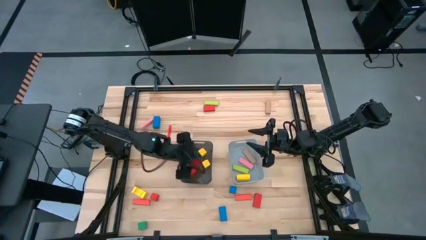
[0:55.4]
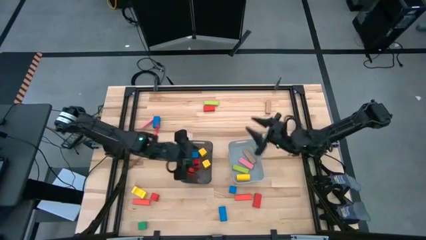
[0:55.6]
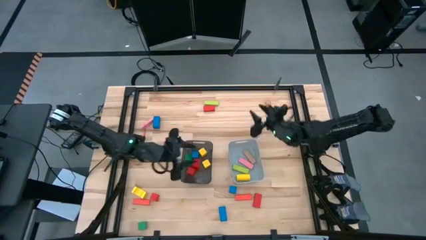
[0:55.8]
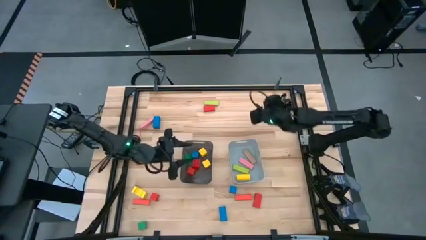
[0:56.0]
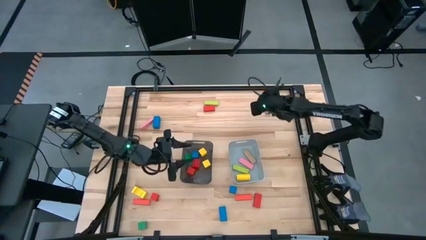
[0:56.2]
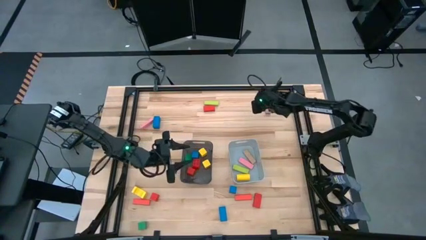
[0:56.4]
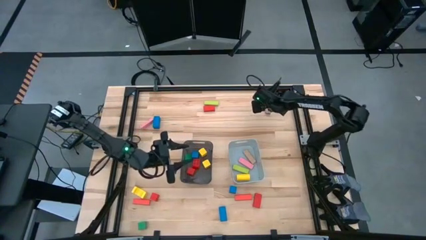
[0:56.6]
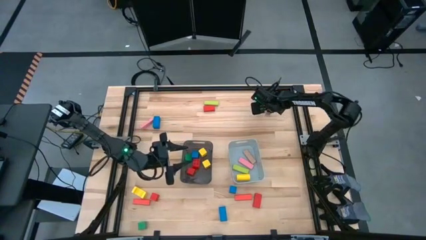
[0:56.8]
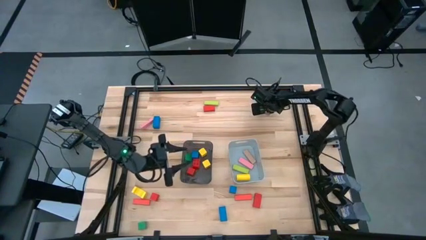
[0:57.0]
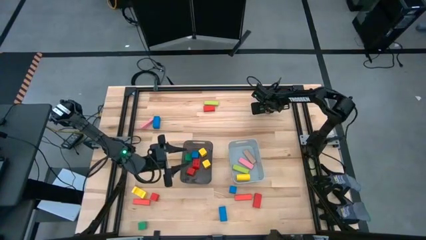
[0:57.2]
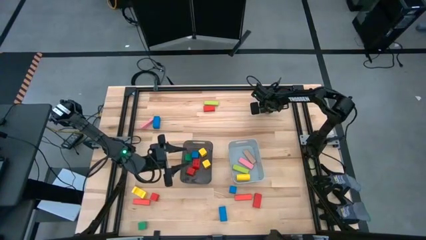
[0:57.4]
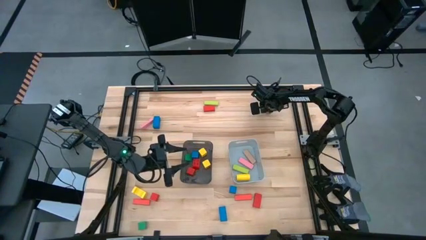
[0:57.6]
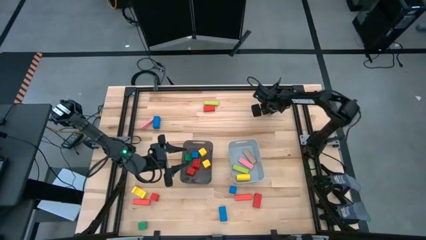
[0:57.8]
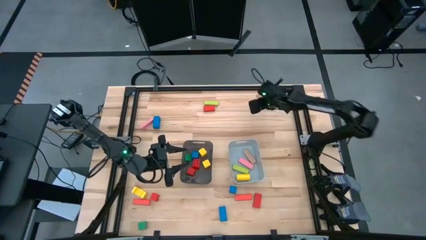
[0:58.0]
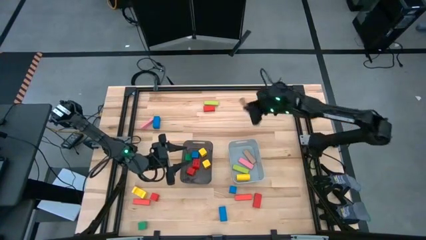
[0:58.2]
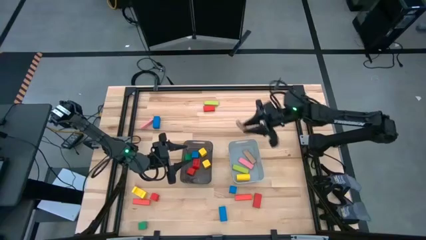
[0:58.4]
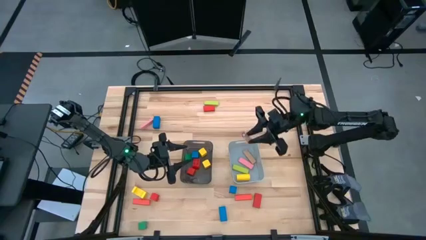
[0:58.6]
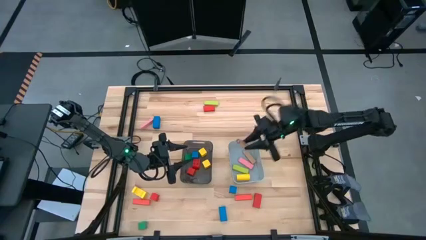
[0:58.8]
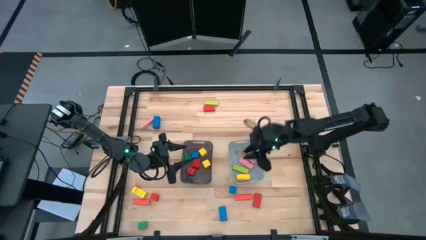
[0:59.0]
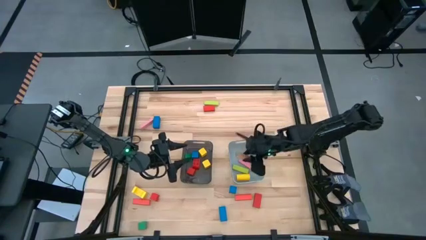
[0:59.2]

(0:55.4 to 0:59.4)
Task: Sort blocks by size
Put the large brown block into the gray bin

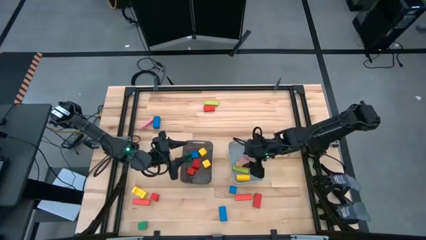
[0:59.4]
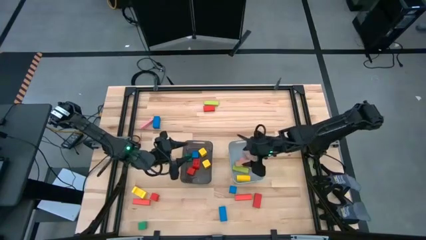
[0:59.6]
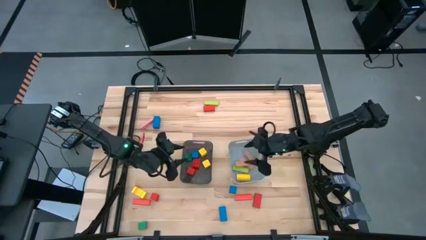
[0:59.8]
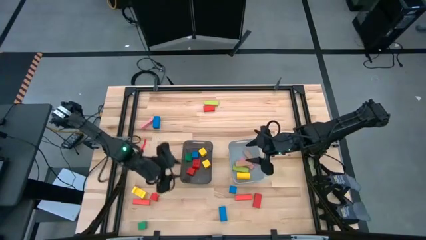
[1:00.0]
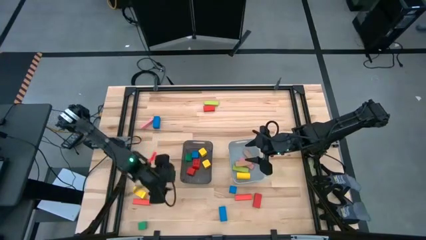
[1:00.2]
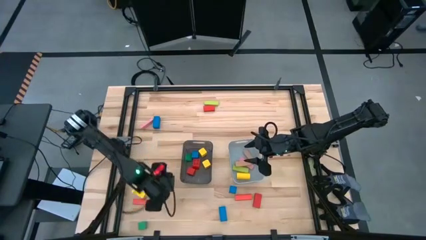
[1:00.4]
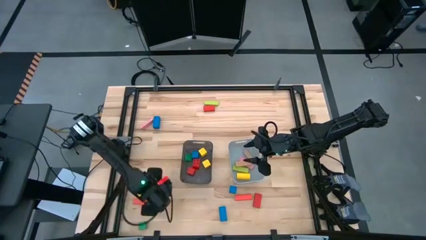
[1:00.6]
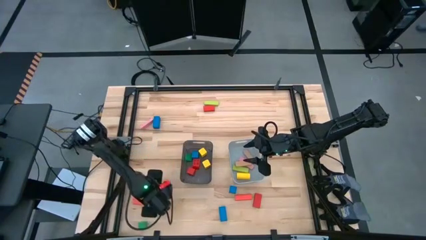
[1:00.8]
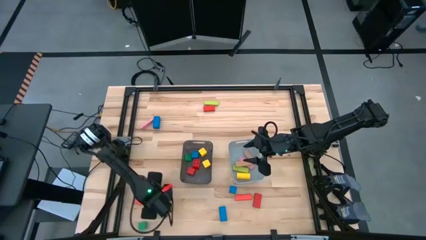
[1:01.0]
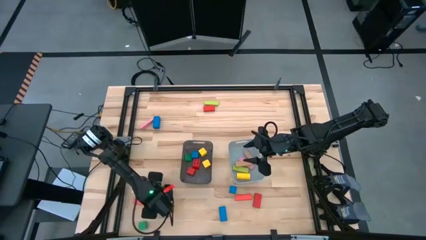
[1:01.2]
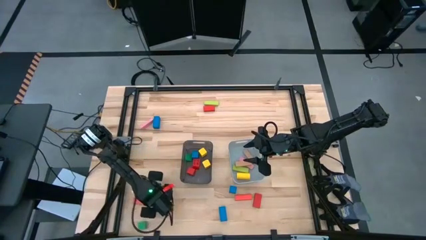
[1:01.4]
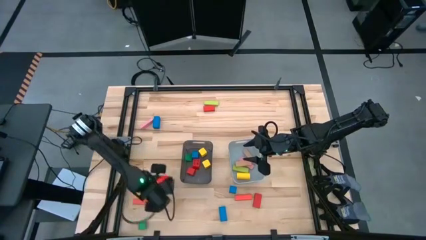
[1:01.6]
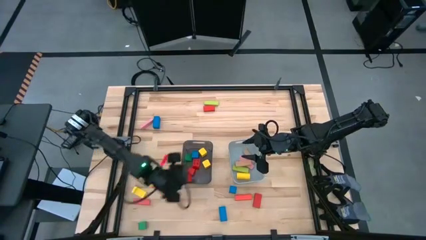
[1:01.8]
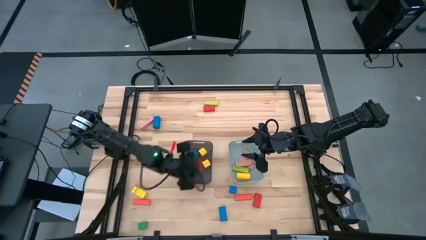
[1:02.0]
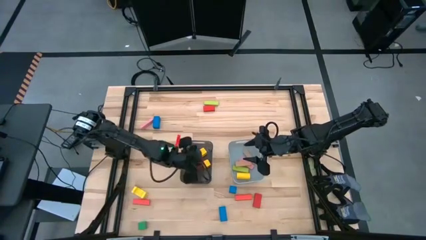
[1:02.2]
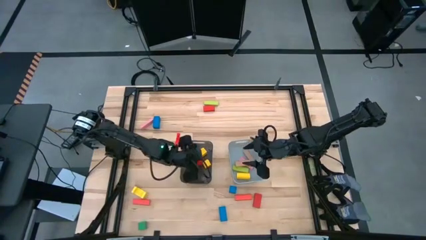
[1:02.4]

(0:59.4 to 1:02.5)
Put the small red block into the black bin

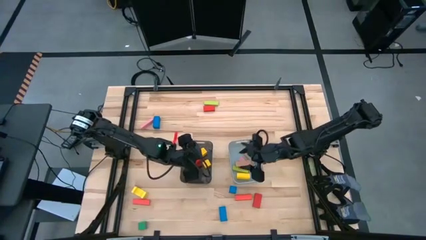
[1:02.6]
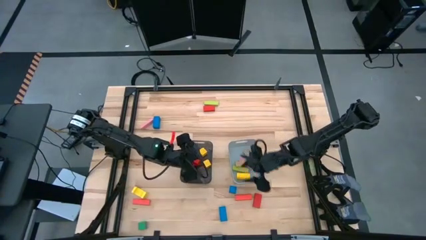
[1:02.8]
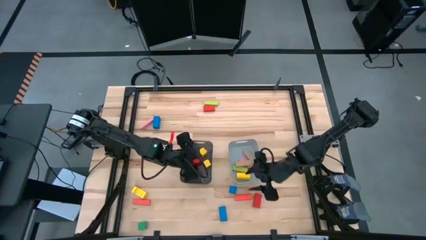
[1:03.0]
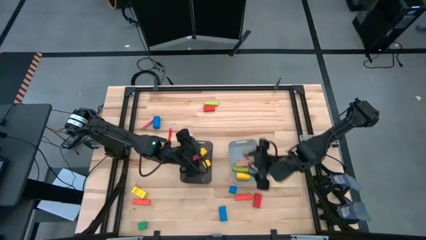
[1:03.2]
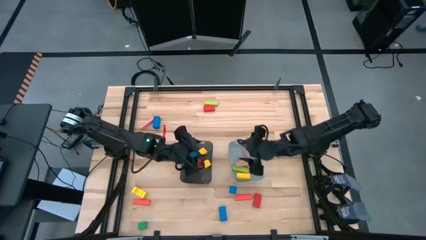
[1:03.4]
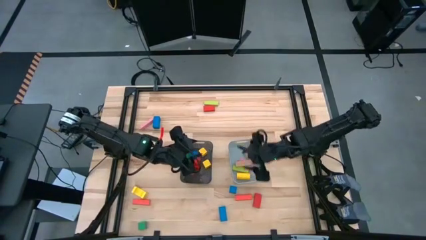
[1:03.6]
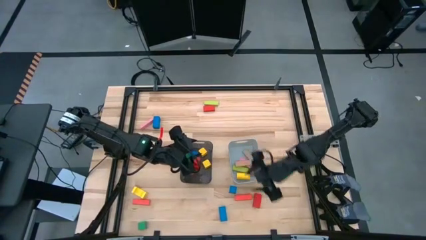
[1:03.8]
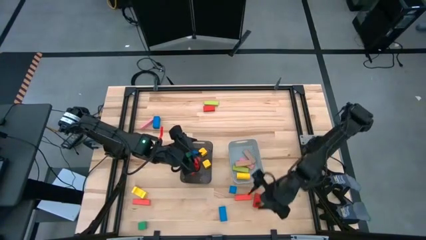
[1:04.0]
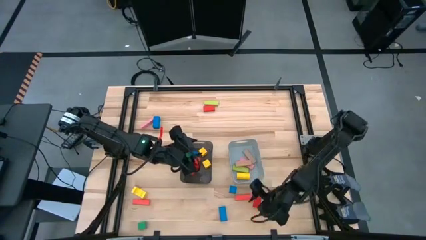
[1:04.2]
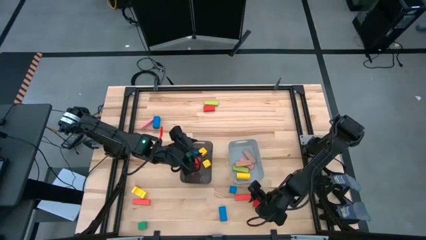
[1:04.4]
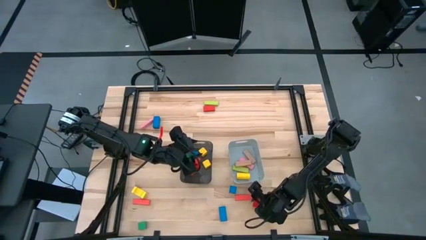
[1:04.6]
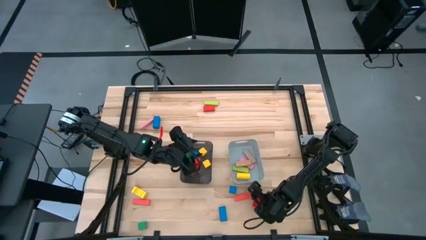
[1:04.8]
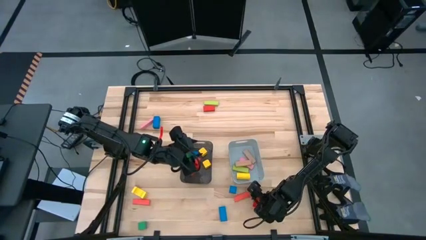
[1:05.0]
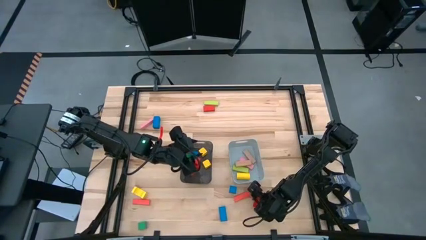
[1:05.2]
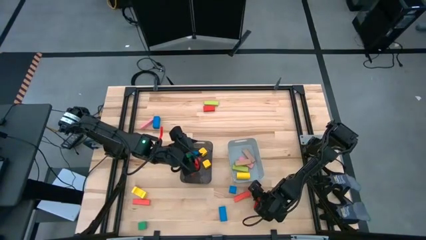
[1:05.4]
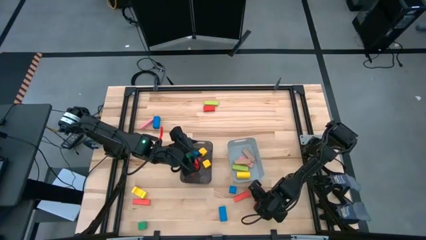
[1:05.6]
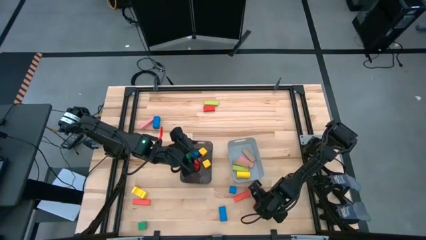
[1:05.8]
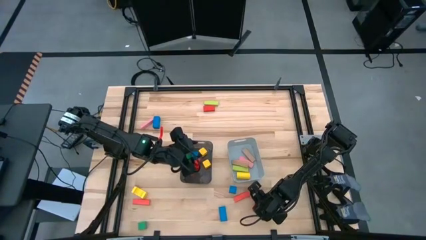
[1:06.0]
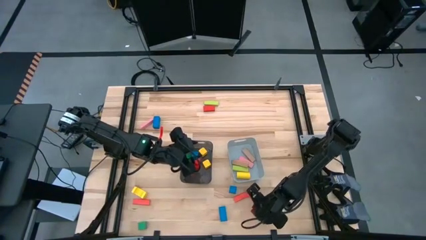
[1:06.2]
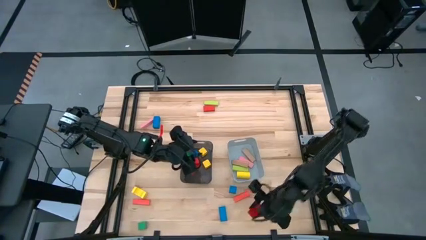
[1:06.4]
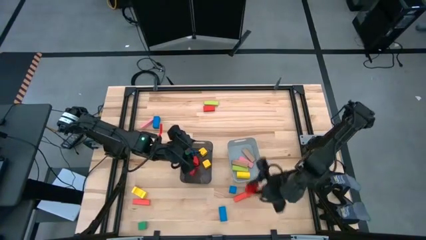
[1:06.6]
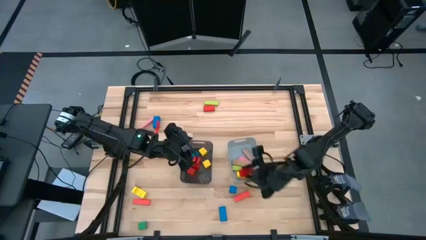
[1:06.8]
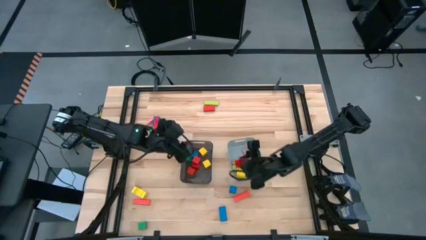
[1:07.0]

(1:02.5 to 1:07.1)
Put the bottom large red block into the gray bin

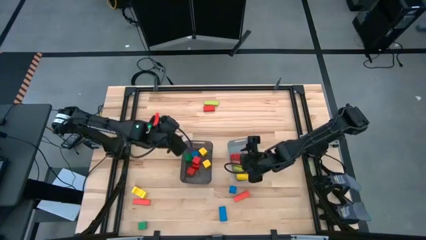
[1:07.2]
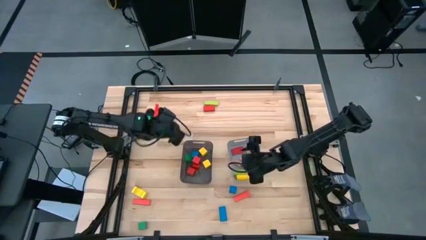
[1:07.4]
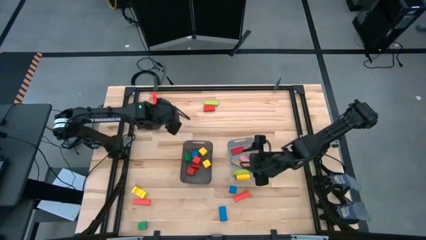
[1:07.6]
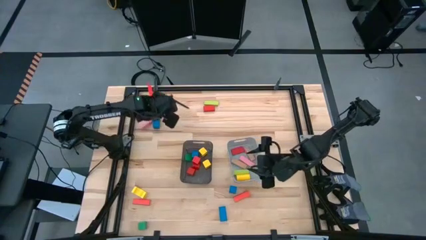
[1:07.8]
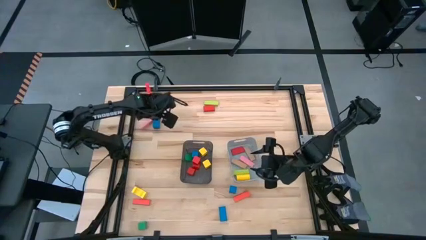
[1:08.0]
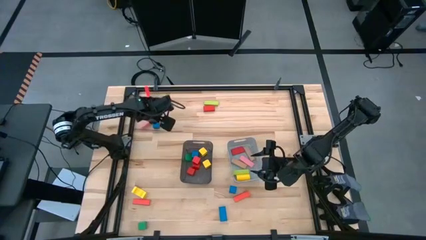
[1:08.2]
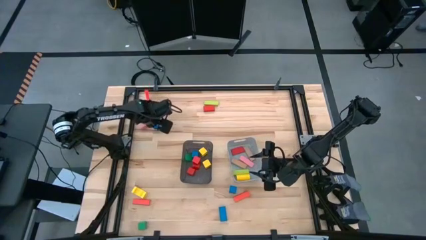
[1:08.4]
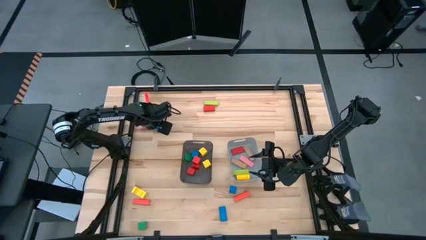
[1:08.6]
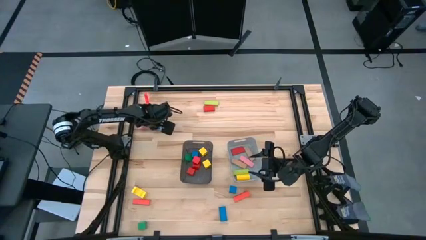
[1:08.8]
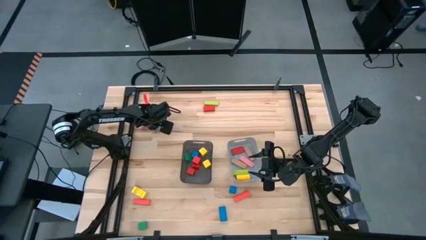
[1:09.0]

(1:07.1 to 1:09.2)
Put the top large blue block into the gray bin

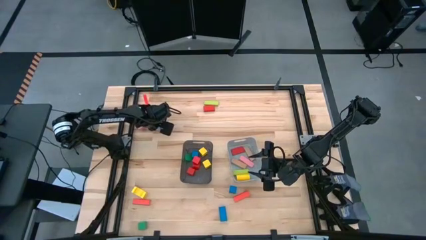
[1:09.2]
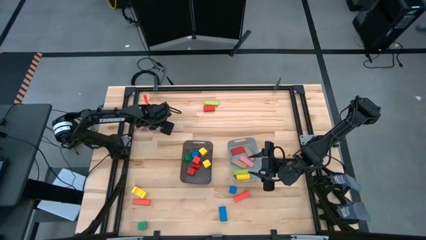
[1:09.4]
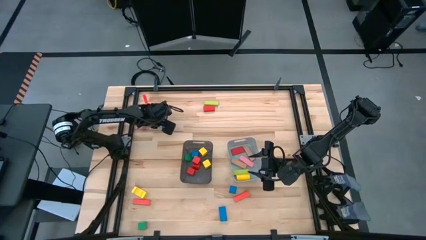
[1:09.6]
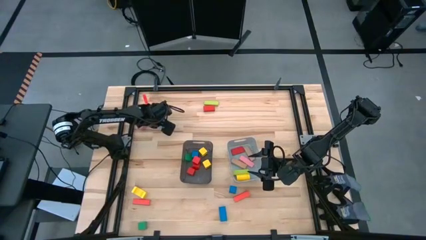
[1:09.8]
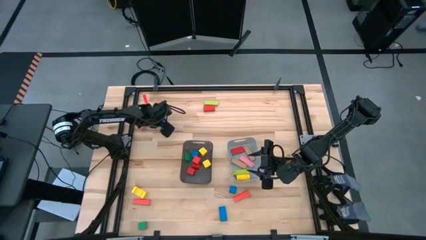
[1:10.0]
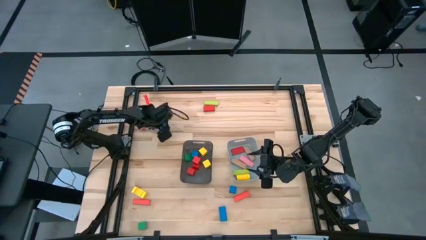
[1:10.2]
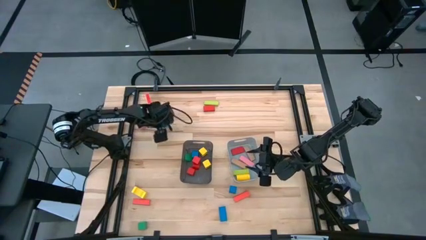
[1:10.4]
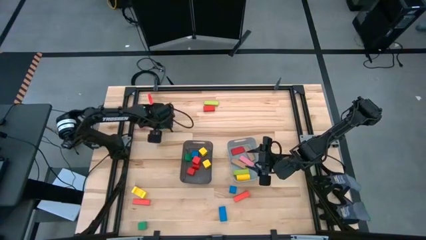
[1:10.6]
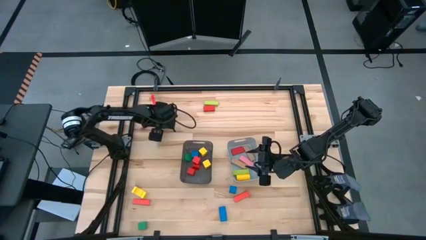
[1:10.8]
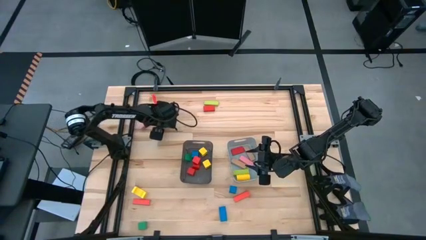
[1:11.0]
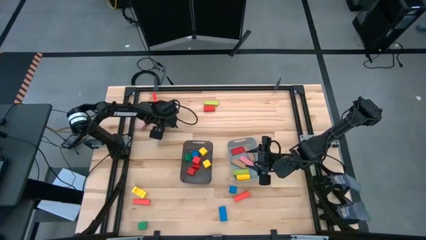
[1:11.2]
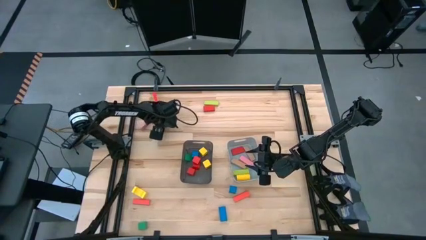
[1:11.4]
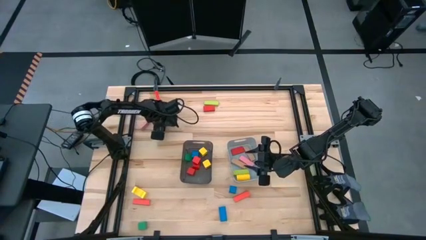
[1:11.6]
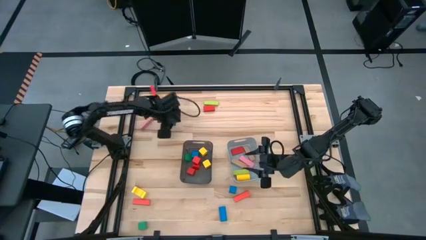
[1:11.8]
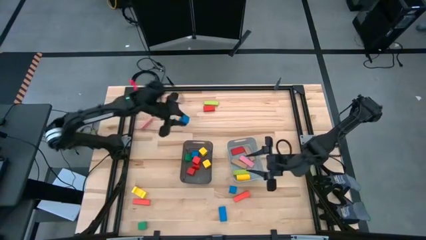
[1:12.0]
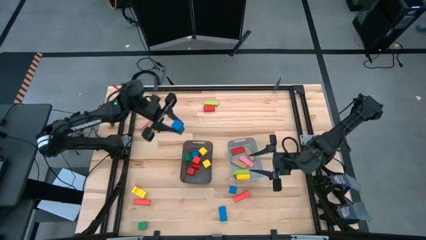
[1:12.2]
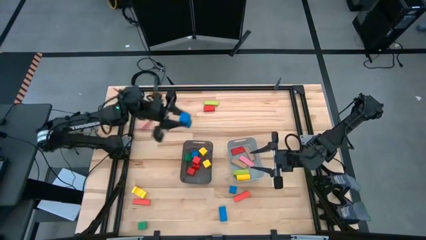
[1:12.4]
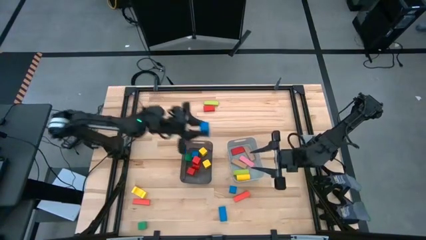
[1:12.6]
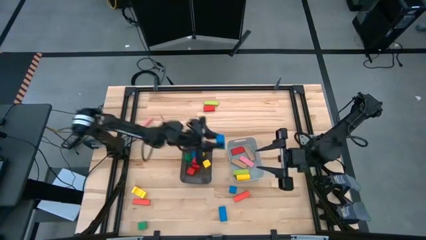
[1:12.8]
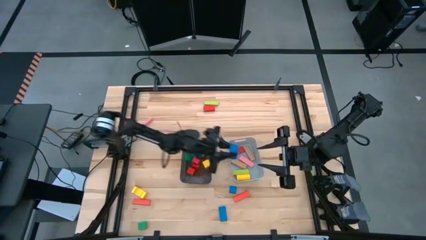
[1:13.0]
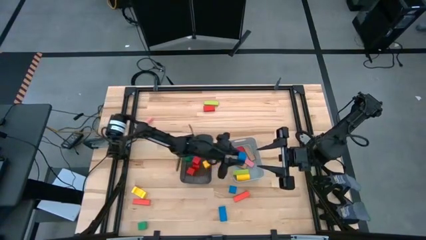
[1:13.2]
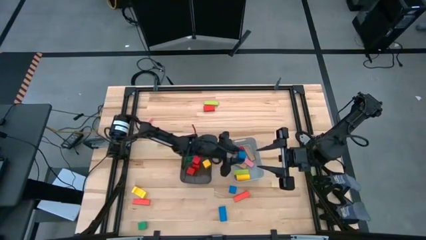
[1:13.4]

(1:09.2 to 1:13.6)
Put the top large blue block into the gray bin
